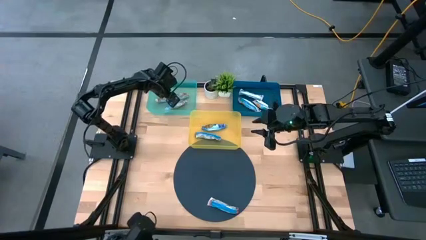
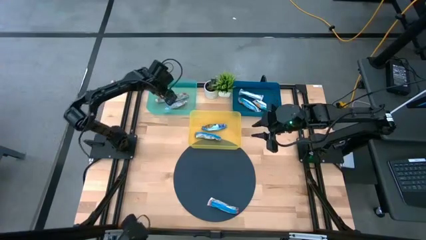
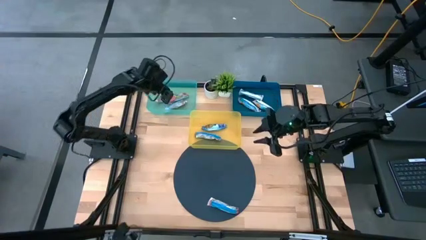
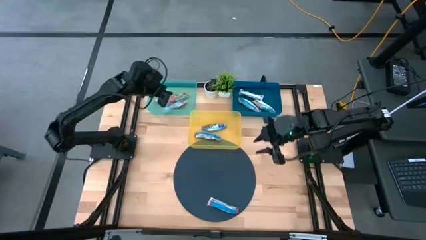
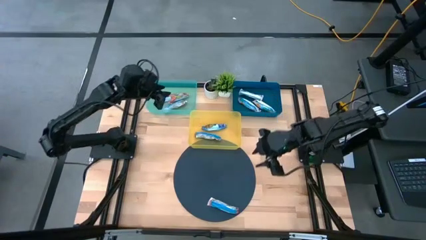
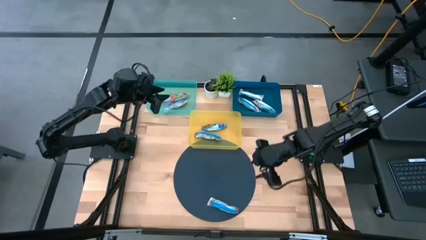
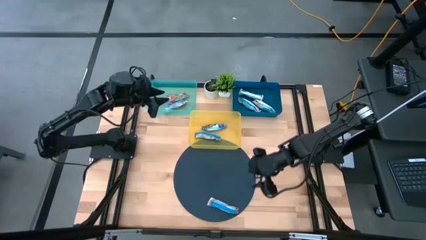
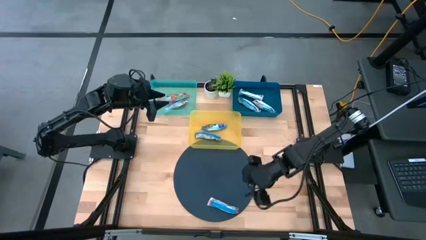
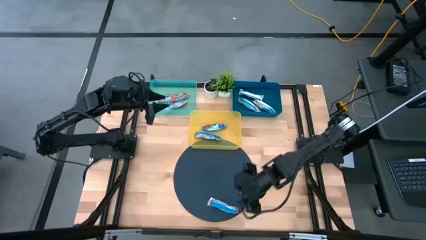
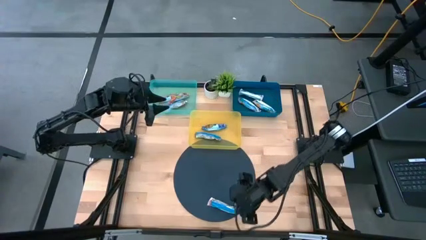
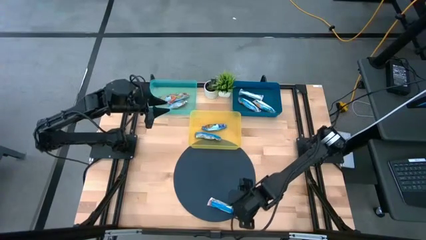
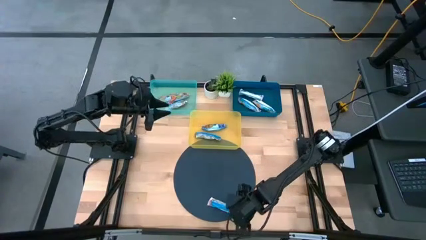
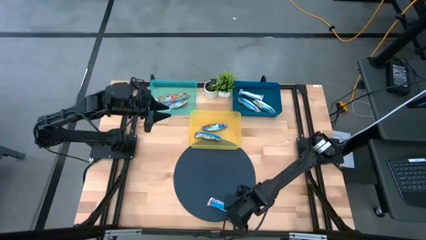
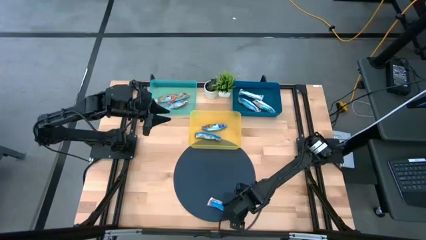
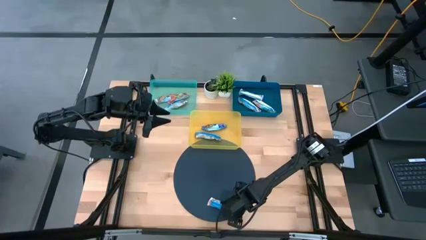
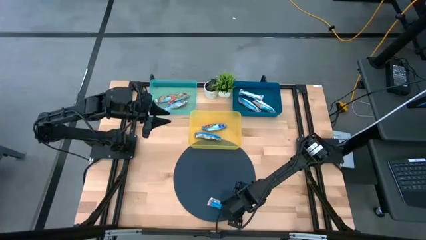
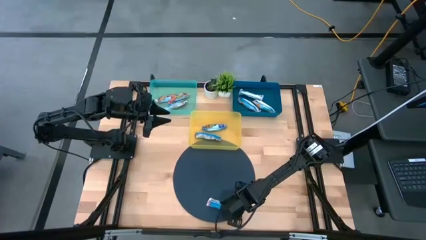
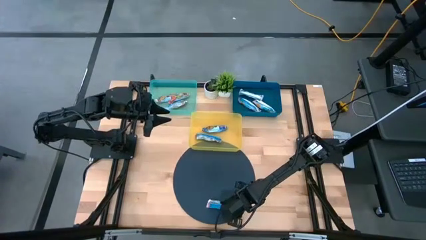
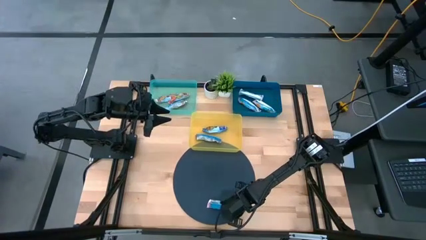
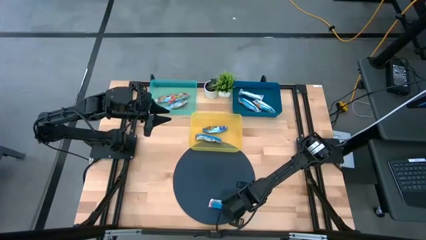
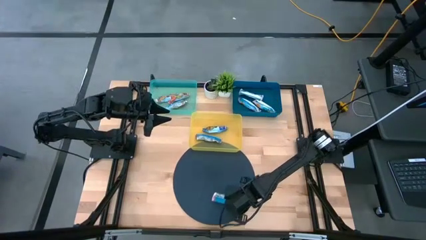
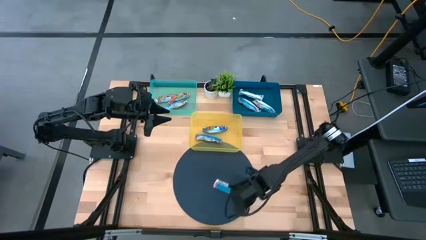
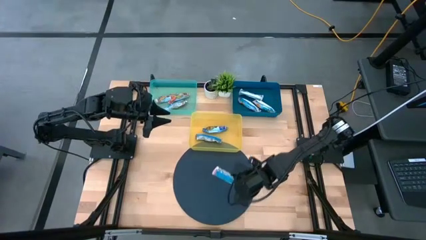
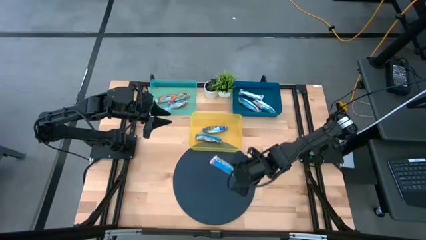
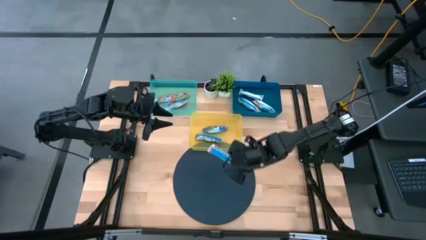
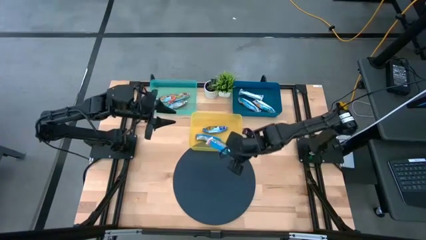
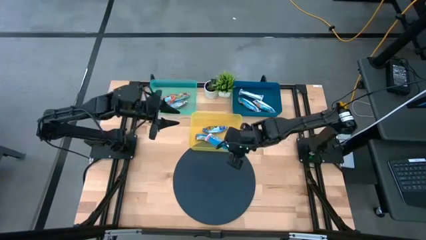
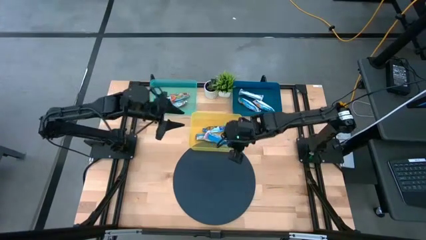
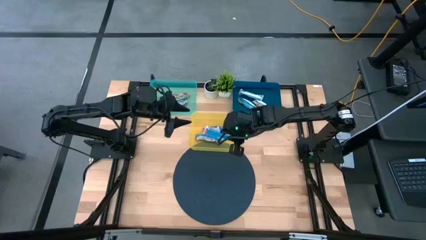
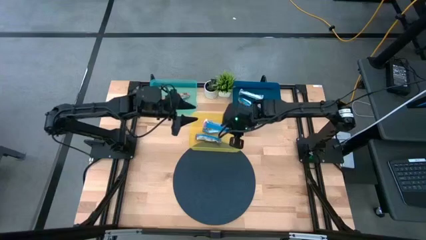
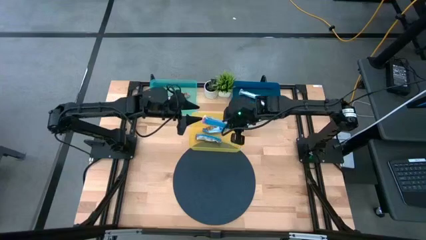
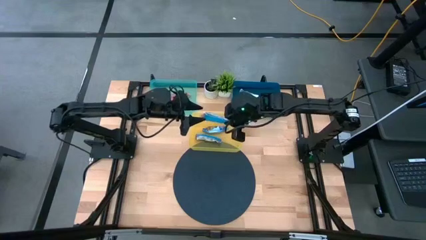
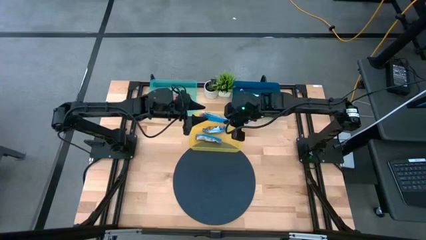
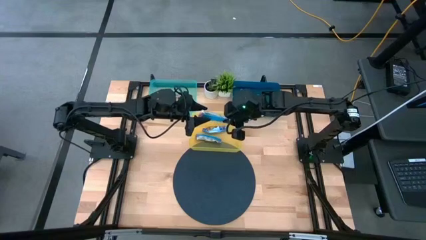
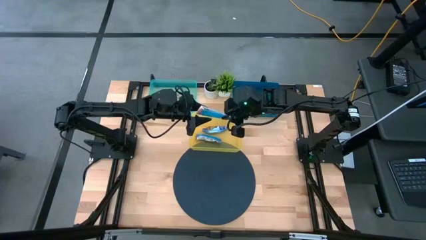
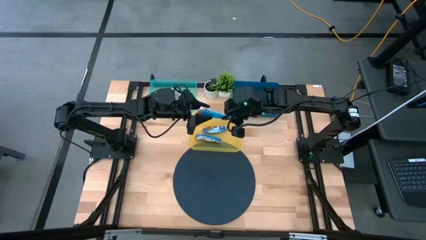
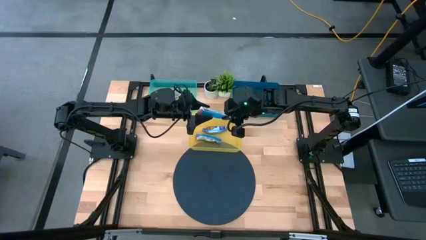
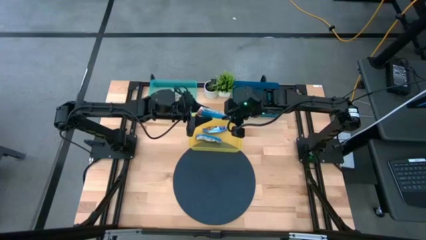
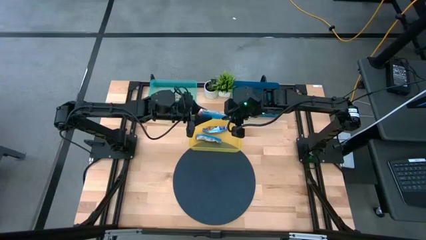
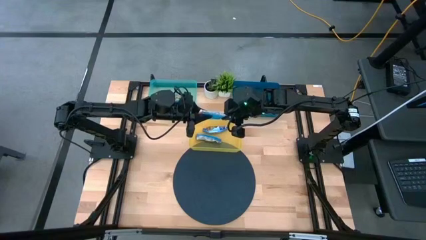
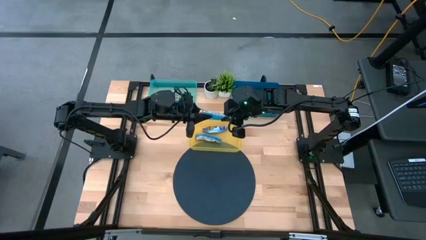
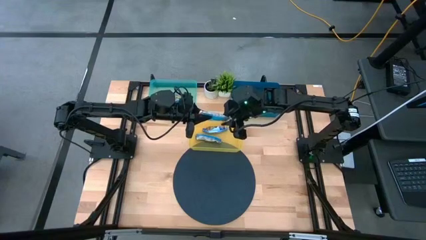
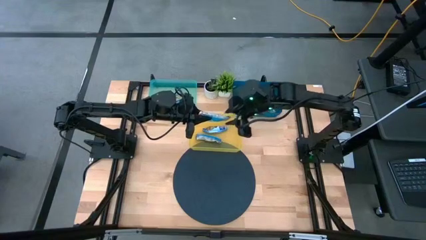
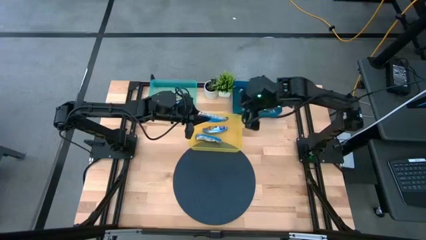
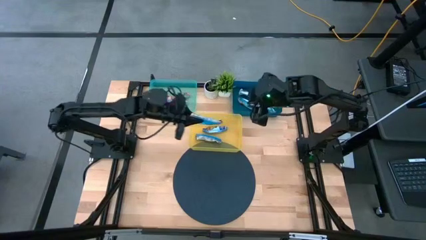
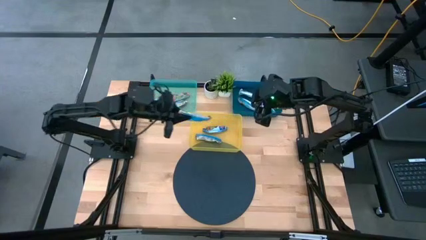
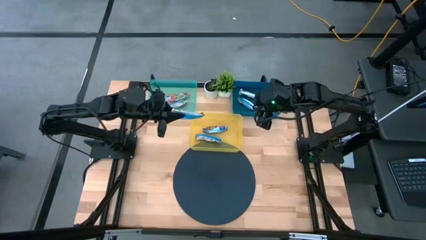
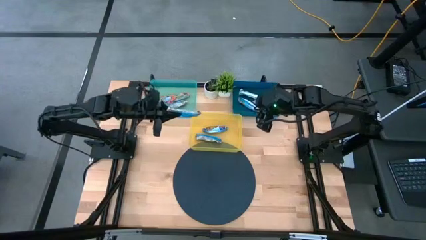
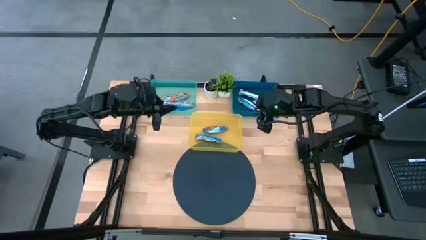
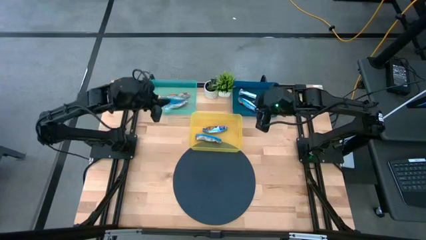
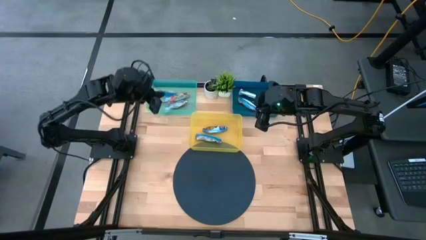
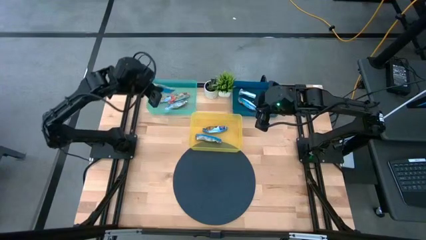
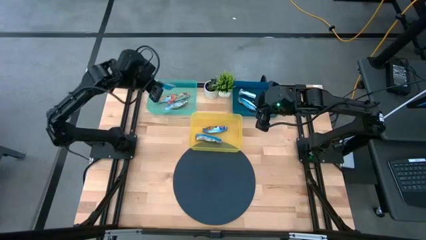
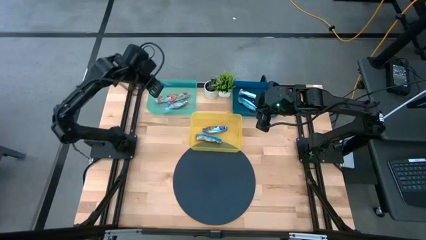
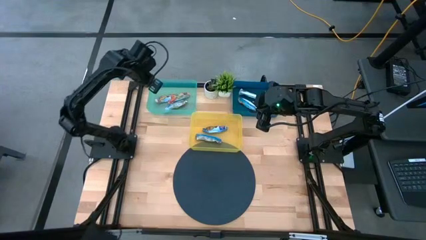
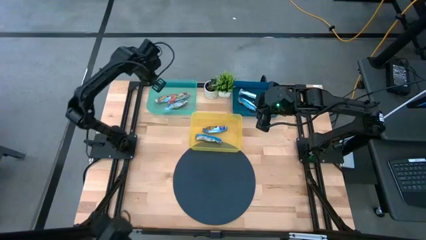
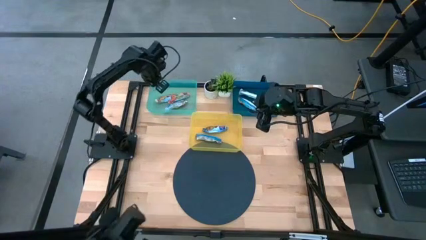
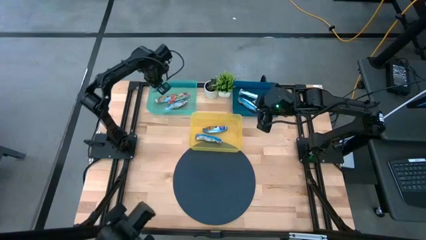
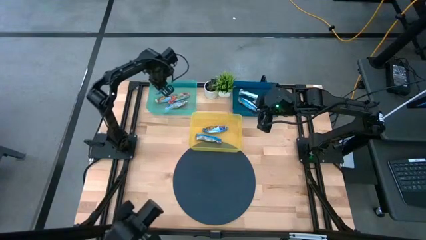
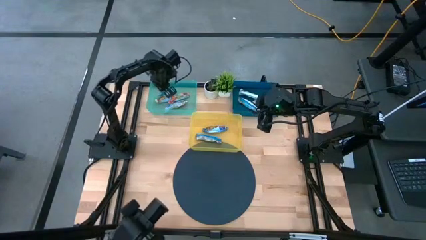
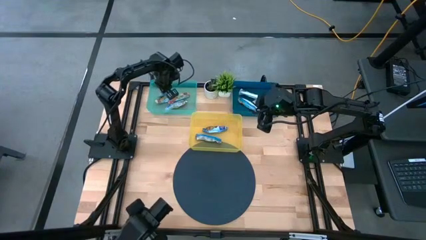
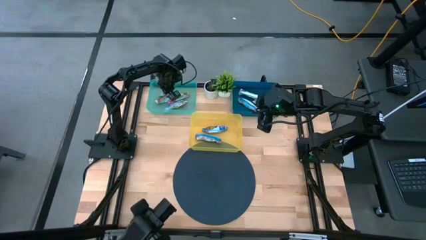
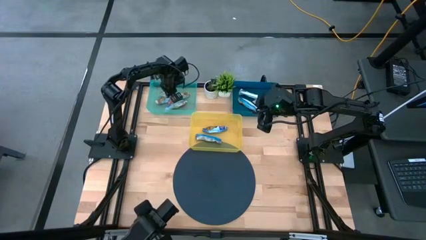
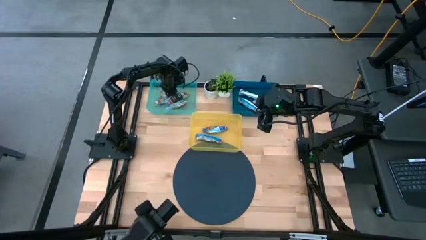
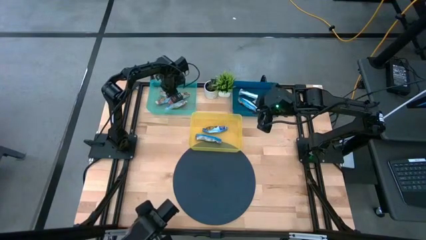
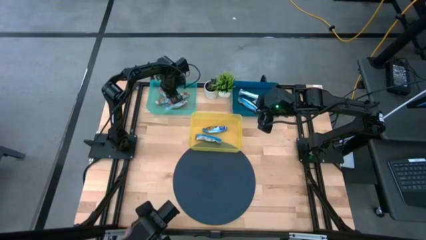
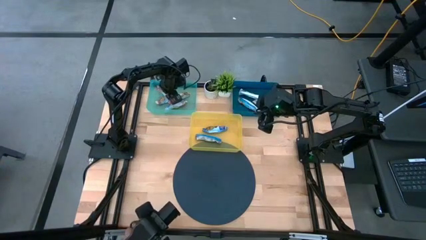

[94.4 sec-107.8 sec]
Task: Pick and place Granola Bars by type
Put the red granola bar into the green bin
